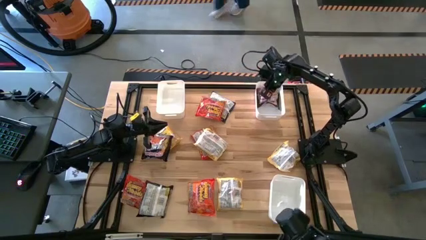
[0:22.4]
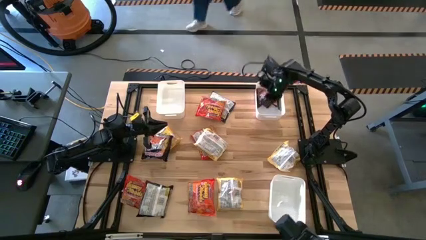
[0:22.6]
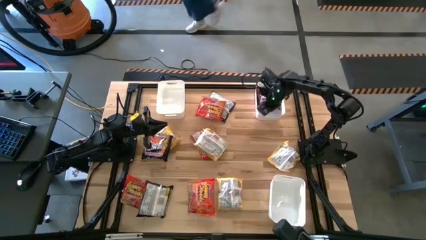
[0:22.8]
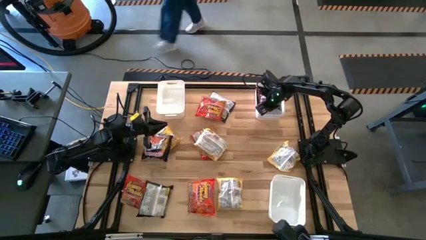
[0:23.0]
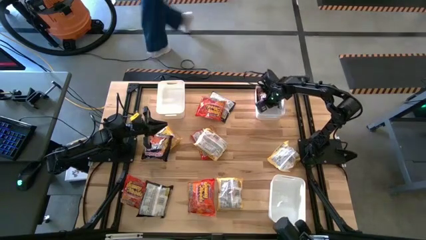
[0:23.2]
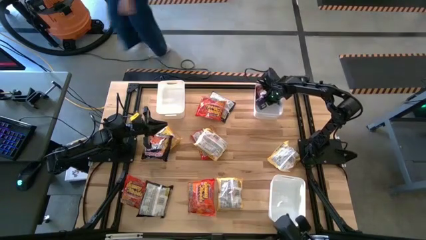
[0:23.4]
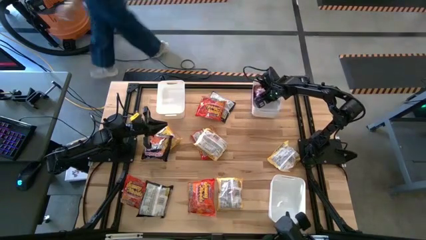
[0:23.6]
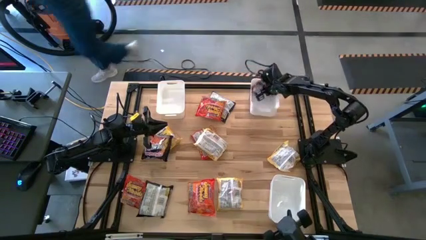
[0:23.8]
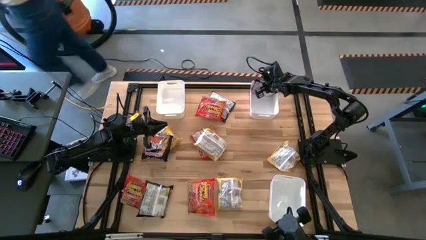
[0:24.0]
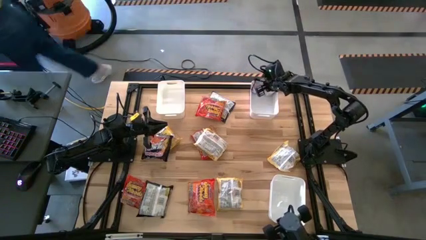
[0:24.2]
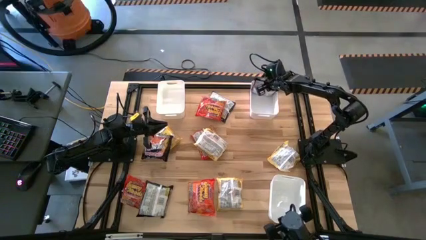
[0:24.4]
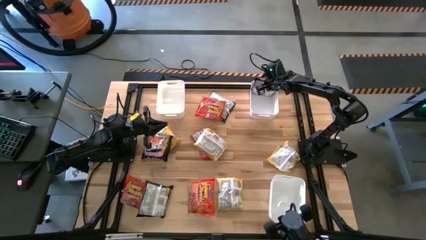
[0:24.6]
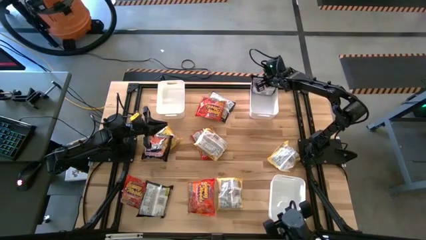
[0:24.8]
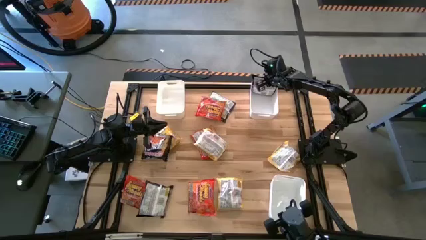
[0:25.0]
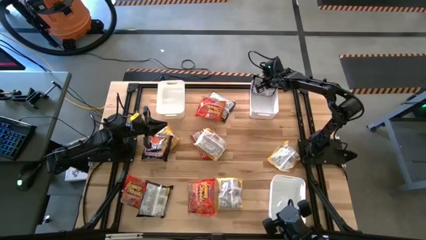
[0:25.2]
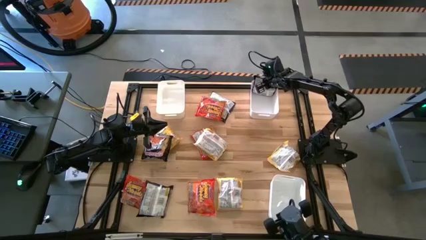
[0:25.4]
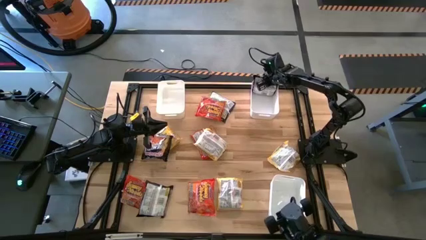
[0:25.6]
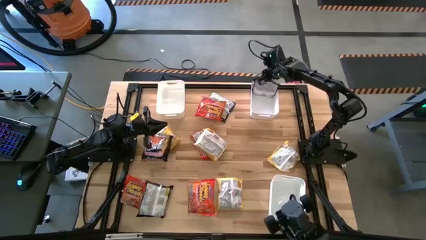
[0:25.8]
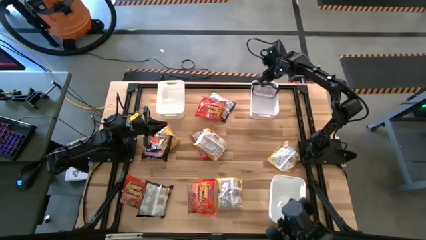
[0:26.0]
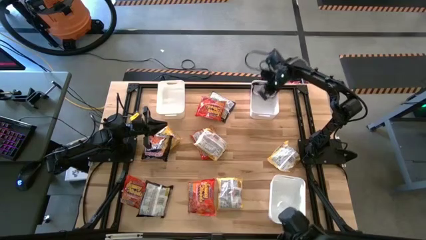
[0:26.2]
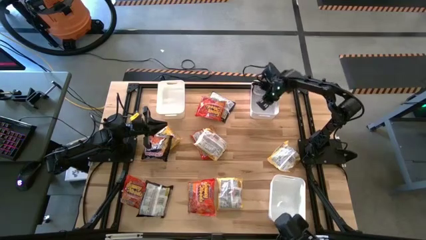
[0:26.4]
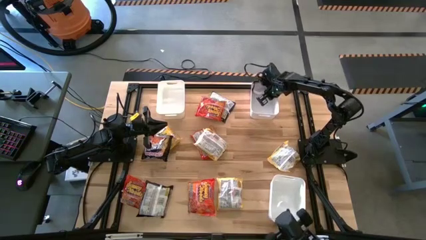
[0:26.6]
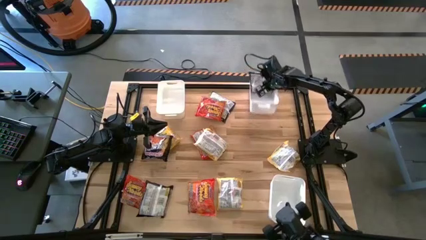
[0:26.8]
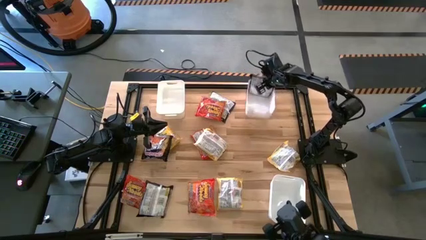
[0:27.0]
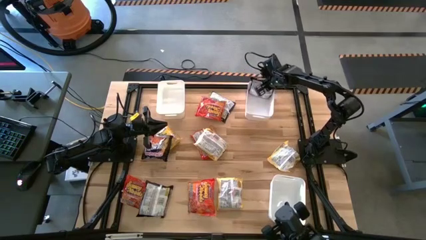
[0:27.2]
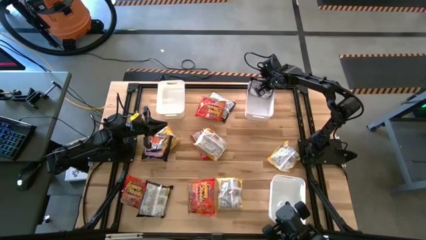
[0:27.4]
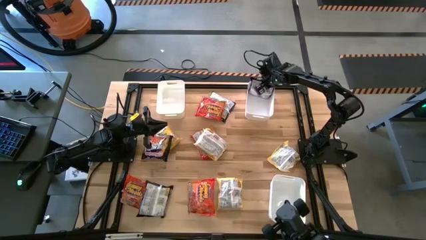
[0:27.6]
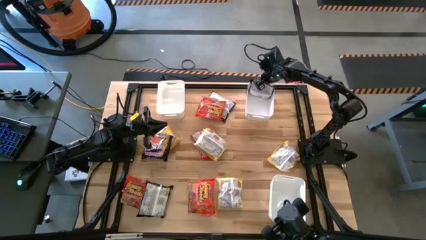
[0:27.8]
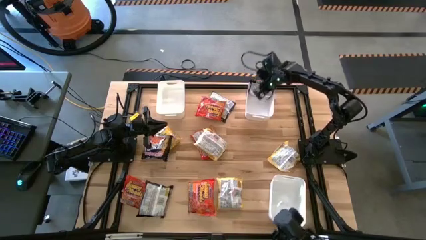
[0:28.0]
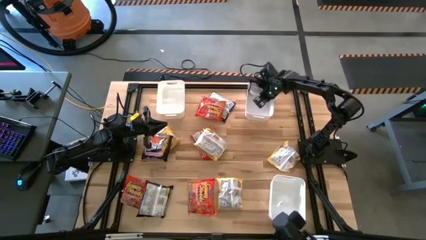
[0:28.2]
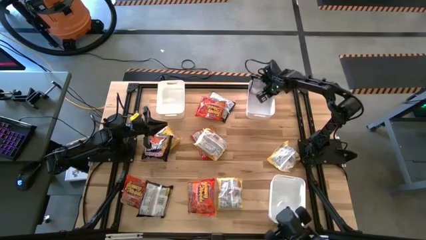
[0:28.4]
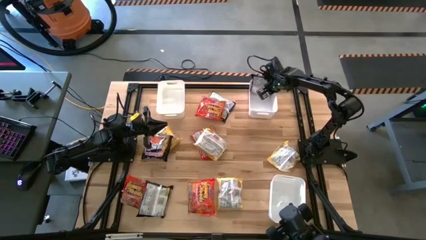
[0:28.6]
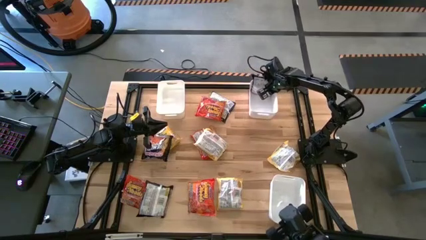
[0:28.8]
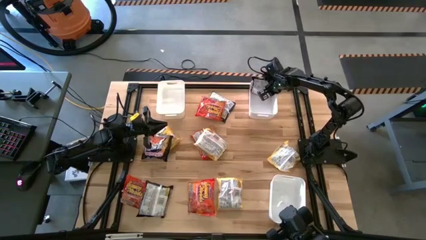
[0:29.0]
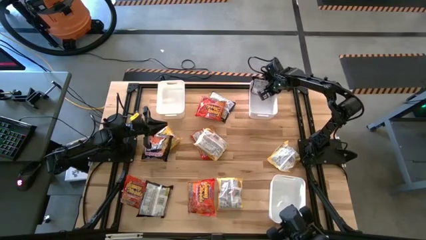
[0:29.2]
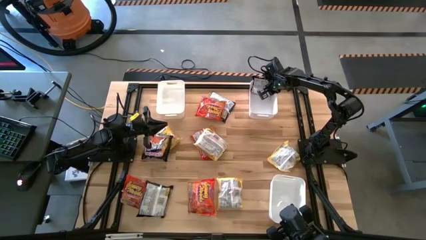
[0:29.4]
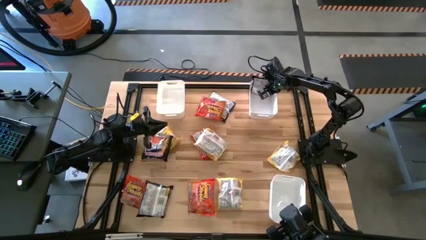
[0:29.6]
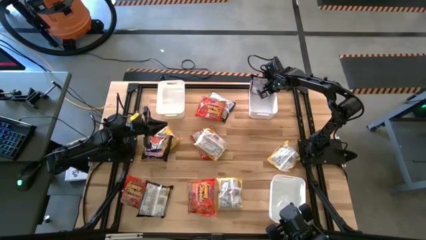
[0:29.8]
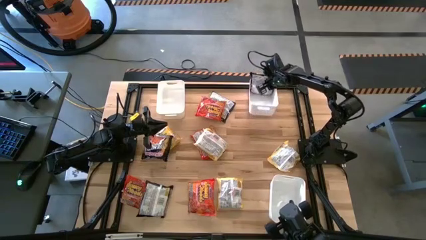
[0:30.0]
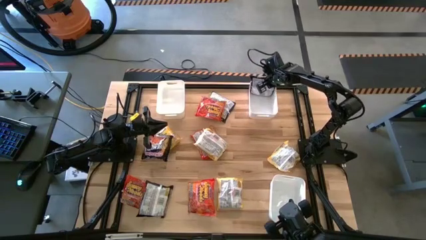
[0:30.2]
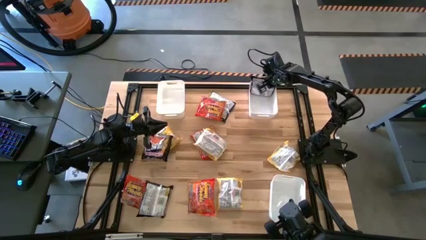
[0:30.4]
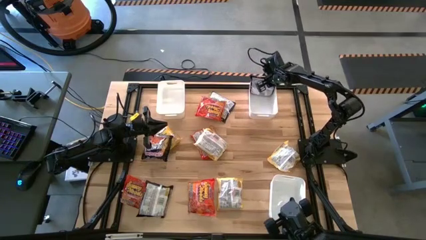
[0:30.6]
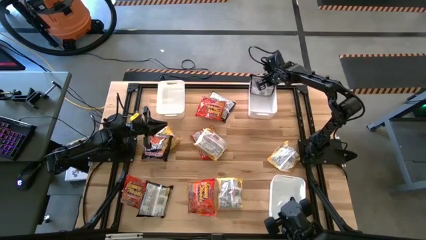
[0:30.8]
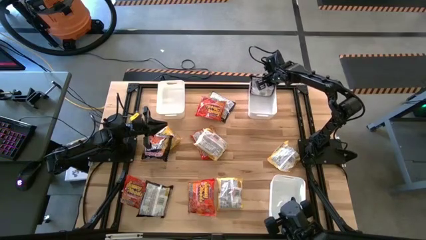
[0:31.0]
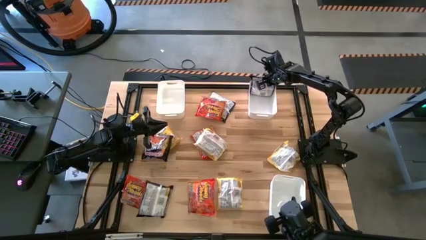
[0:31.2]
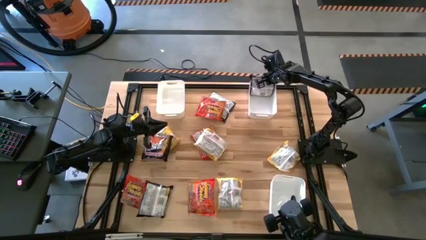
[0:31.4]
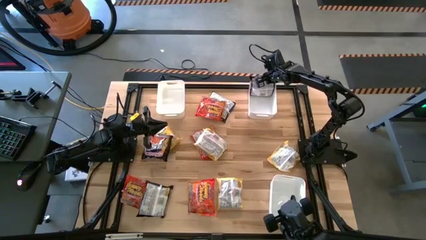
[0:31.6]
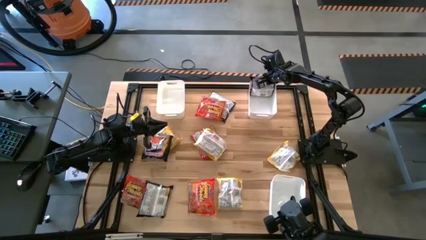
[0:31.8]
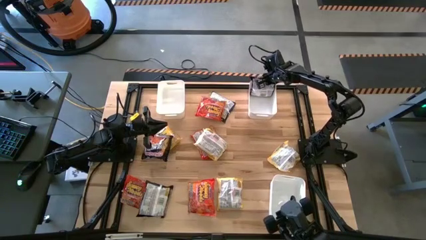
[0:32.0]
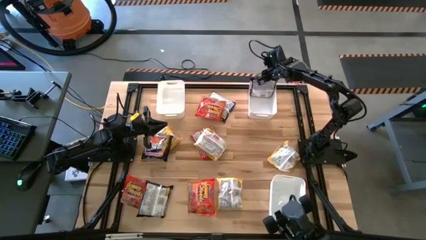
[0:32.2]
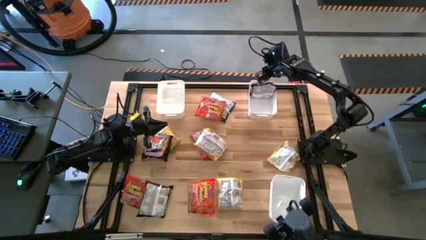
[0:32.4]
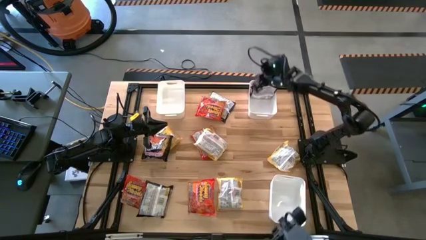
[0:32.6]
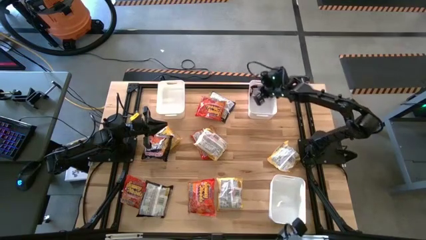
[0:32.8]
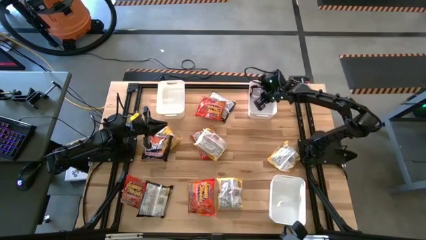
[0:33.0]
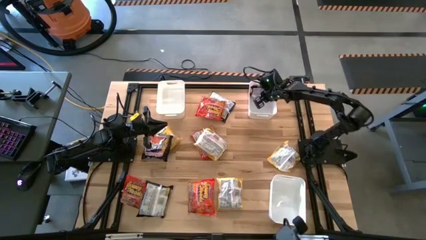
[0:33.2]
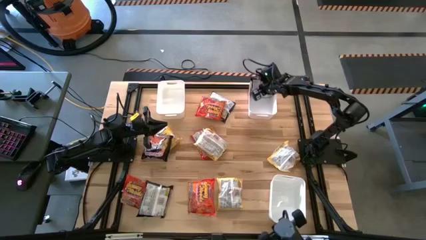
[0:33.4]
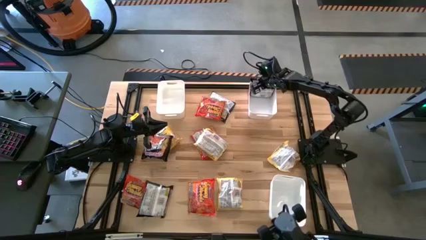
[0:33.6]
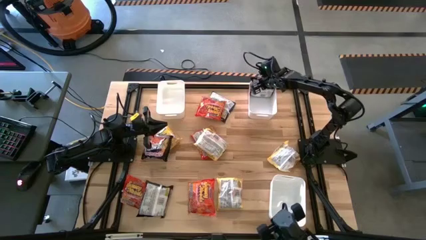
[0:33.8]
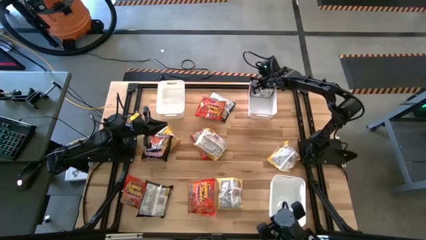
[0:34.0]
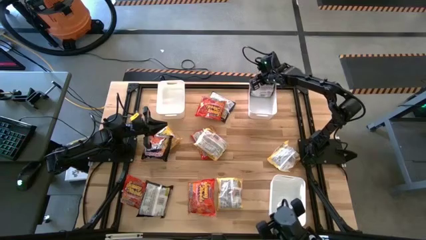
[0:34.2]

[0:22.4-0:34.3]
Task: Sort Maruchan noodles
Put the black noodle pack into the top right white bin
